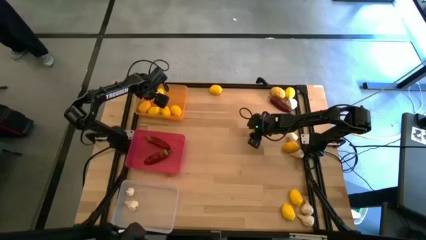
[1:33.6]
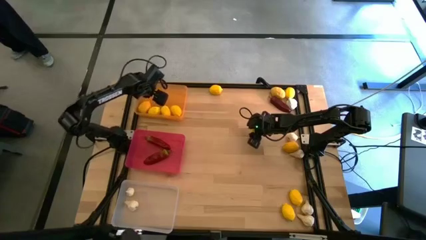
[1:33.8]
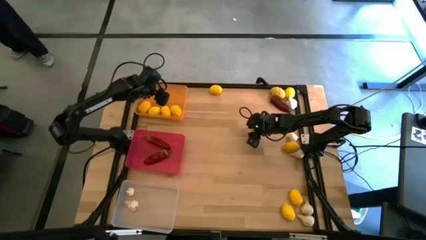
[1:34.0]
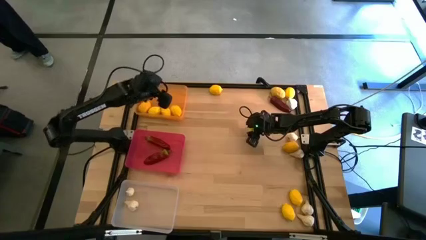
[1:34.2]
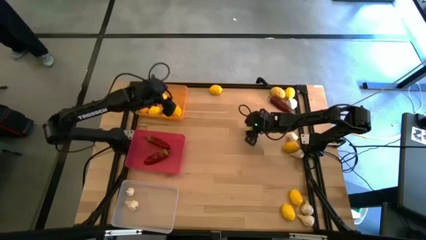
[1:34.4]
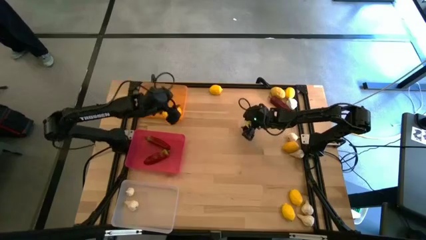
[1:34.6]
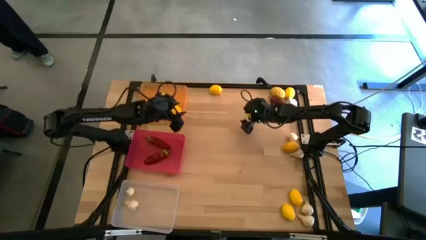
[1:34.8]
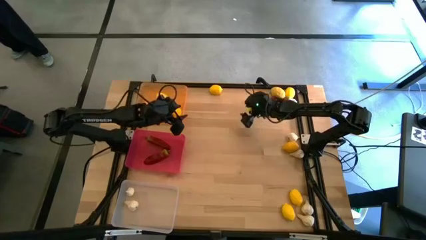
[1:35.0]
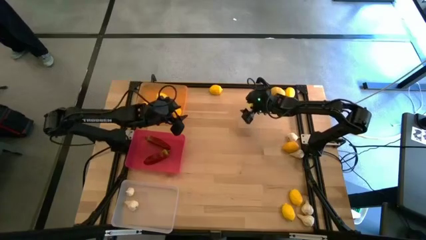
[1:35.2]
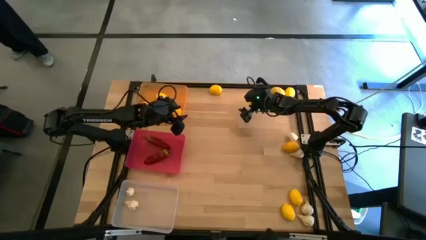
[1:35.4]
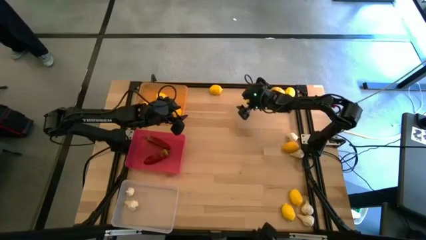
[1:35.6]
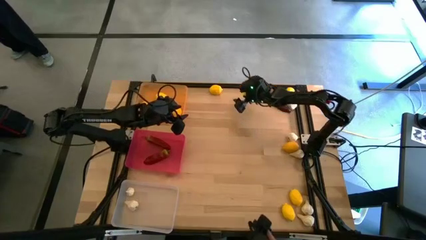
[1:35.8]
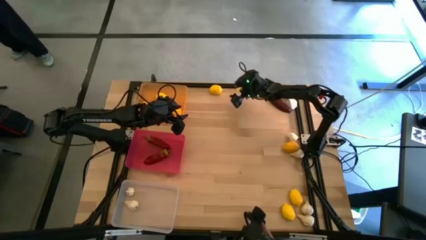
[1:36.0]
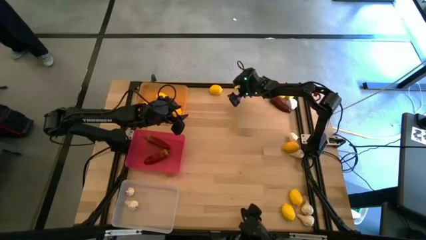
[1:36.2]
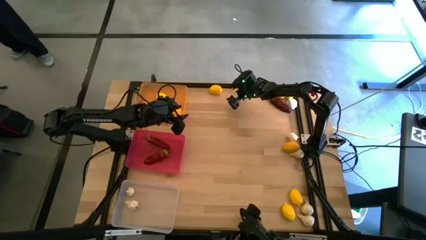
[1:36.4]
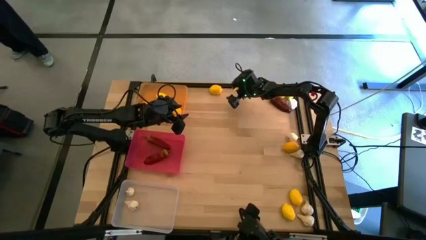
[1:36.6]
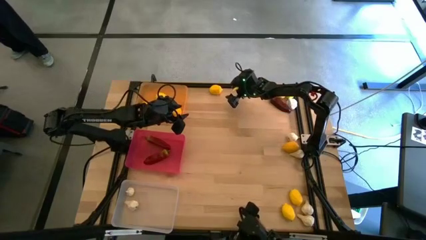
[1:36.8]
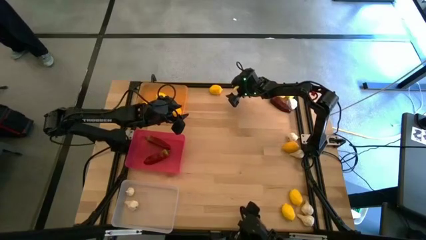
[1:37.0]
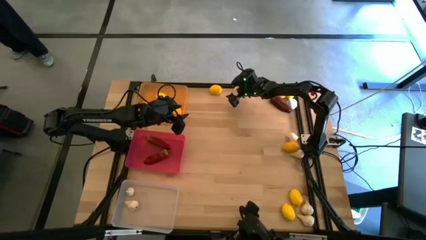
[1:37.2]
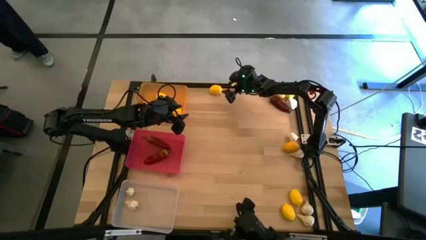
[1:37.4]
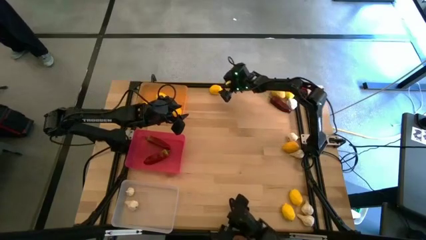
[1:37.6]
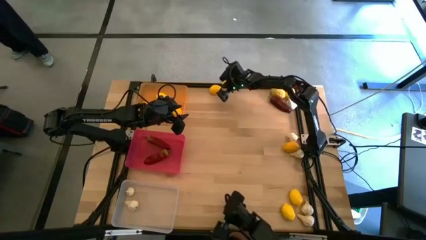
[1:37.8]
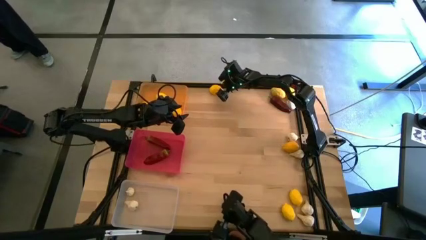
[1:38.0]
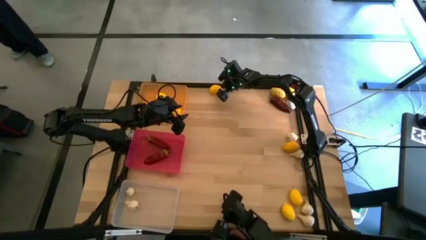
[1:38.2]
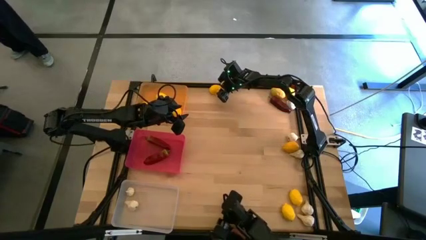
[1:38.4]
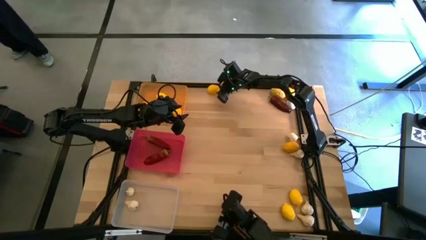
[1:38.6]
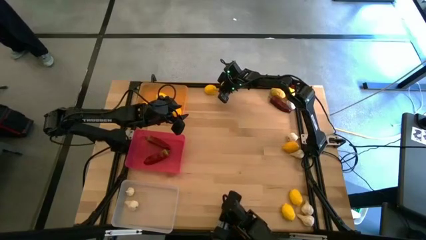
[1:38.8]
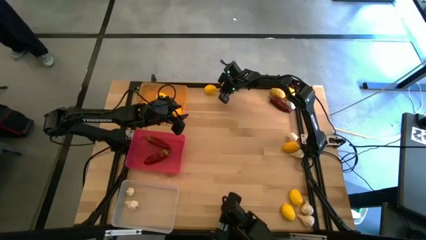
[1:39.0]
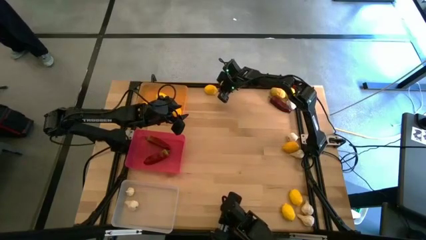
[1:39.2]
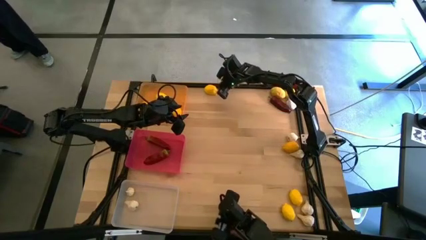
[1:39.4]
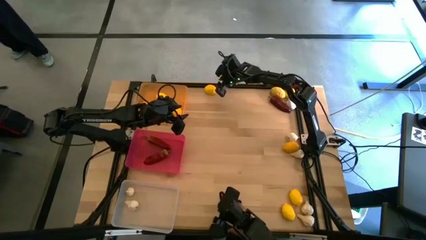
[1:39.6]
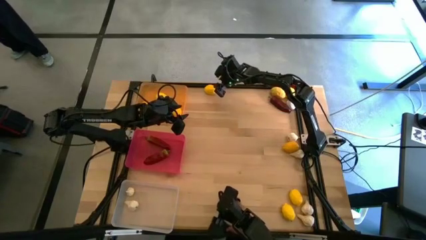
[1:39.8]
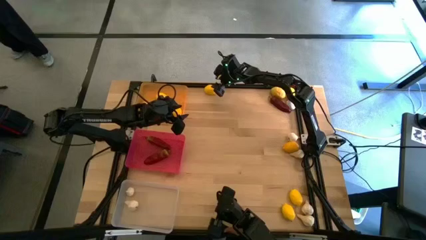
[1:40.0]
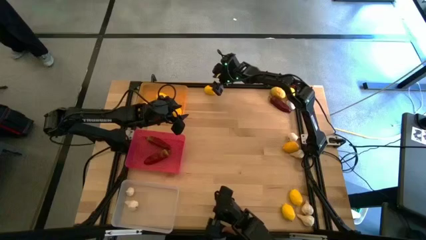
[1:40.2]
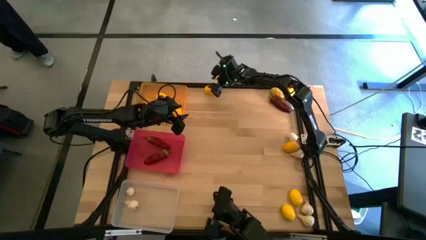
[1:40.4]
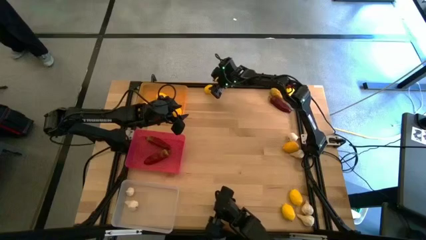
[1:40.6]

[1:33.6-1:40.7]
Task: Sort produce into baskets
Put the lemon into the yellow bin

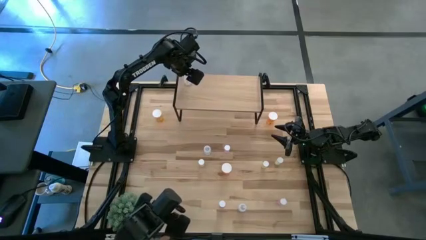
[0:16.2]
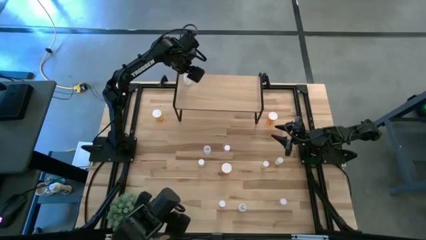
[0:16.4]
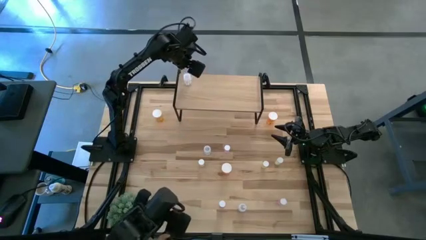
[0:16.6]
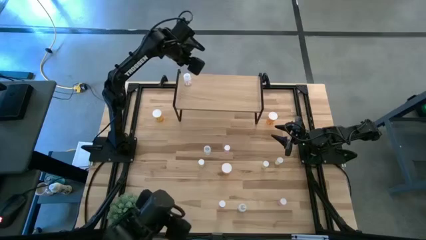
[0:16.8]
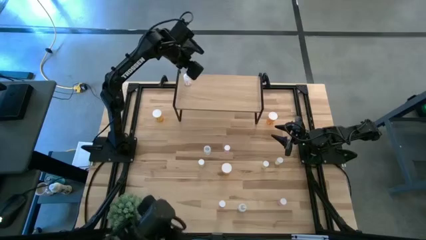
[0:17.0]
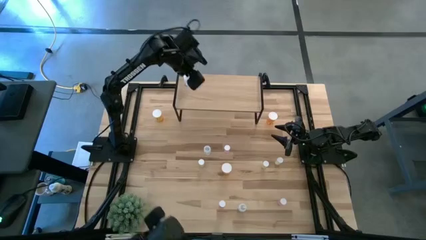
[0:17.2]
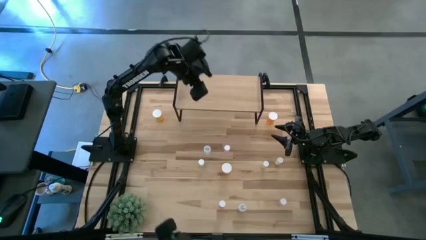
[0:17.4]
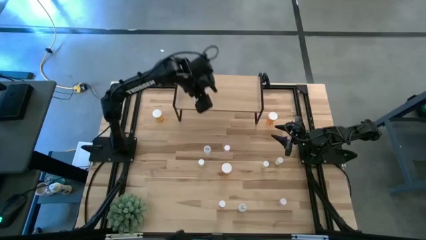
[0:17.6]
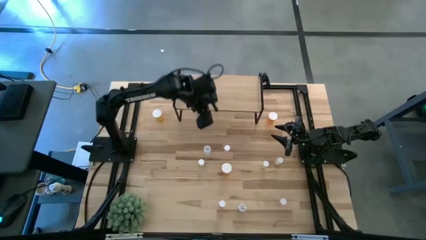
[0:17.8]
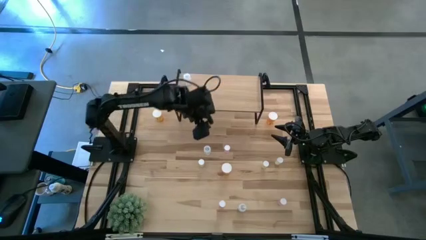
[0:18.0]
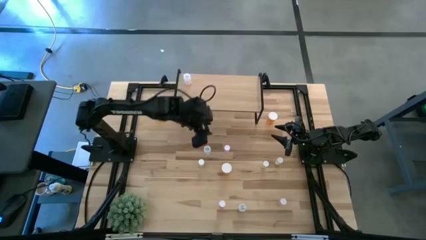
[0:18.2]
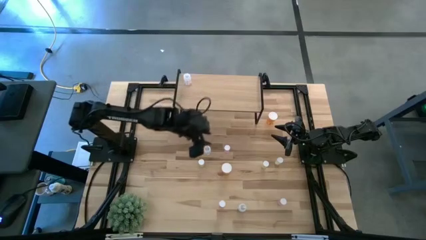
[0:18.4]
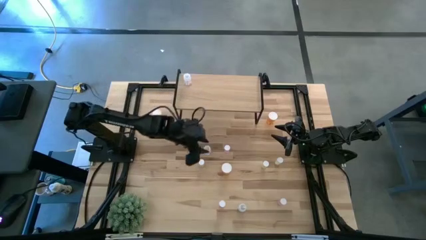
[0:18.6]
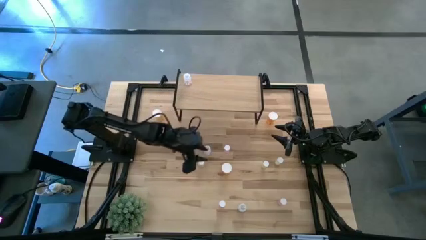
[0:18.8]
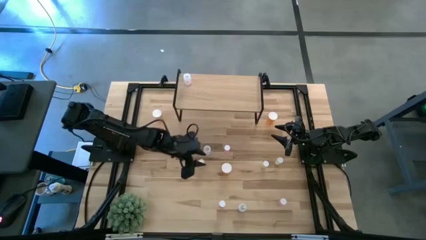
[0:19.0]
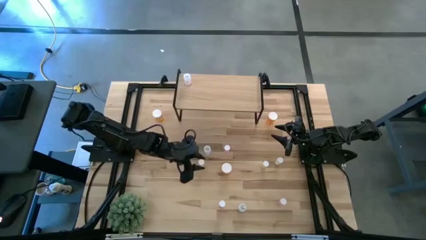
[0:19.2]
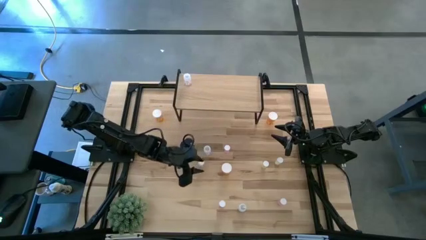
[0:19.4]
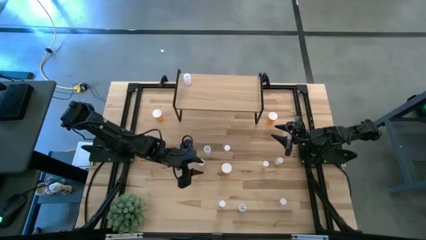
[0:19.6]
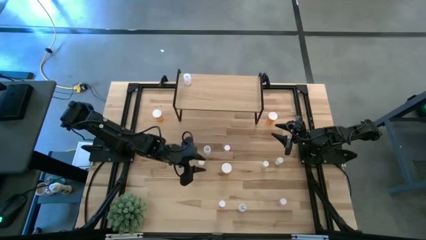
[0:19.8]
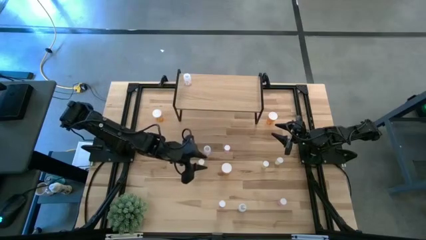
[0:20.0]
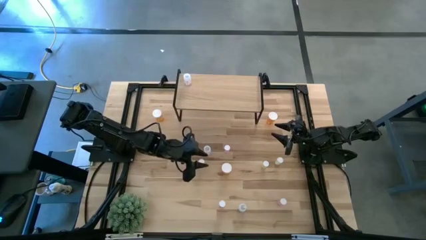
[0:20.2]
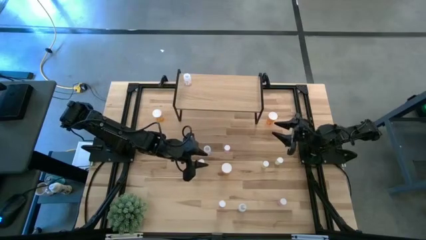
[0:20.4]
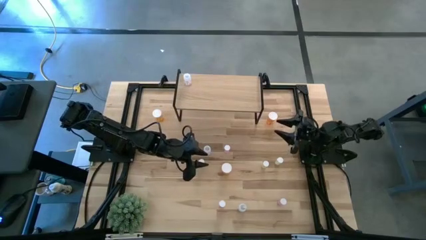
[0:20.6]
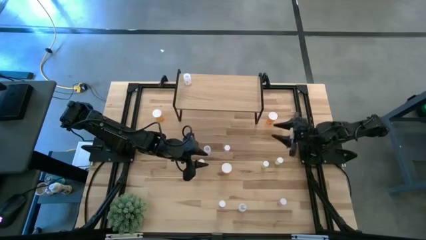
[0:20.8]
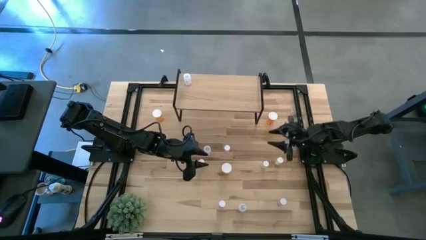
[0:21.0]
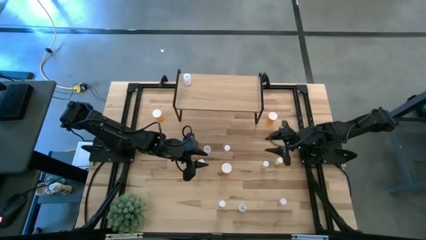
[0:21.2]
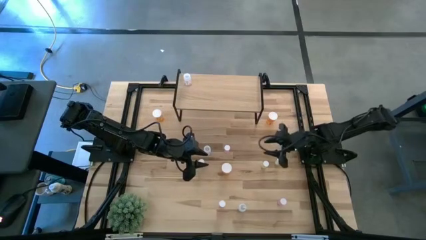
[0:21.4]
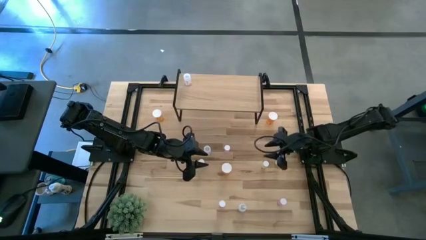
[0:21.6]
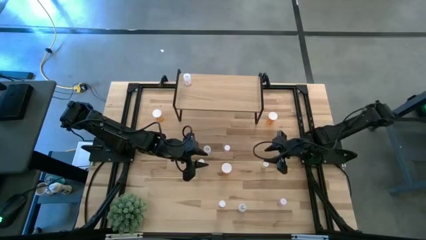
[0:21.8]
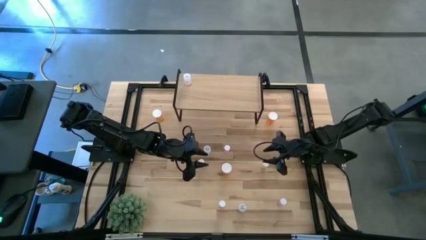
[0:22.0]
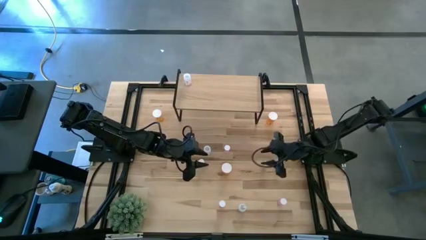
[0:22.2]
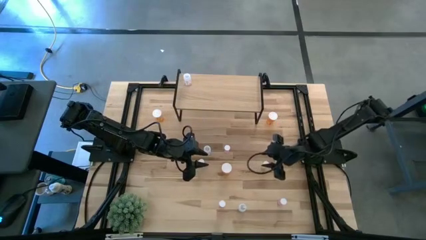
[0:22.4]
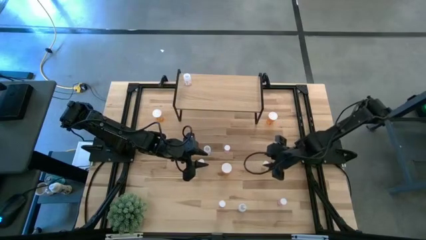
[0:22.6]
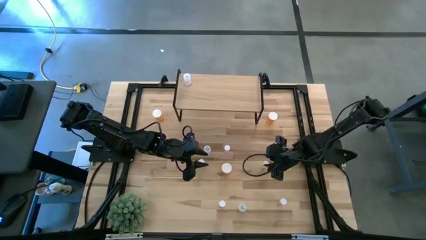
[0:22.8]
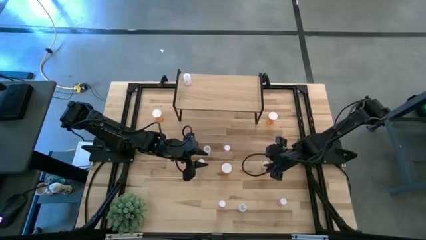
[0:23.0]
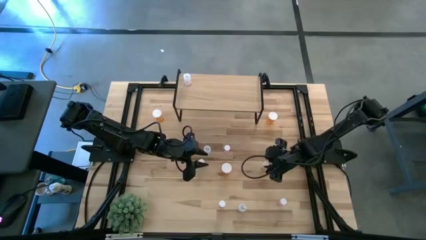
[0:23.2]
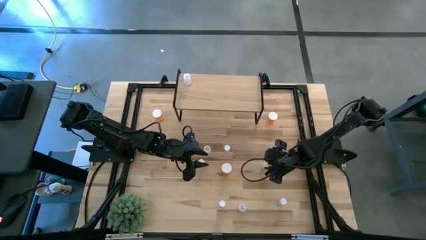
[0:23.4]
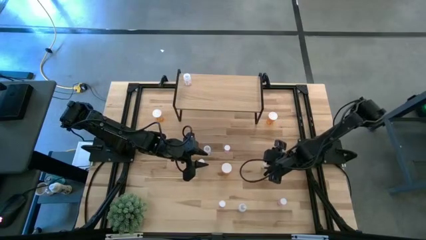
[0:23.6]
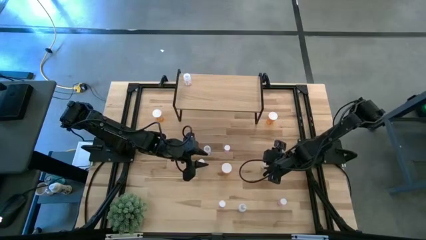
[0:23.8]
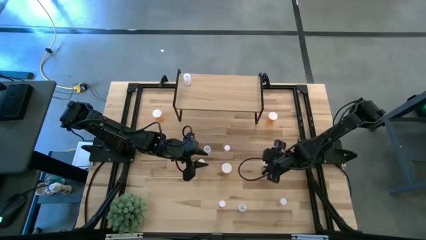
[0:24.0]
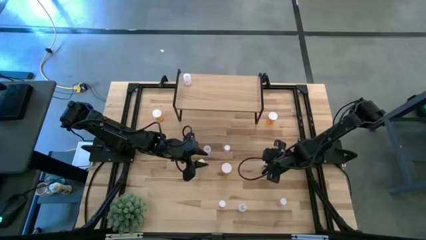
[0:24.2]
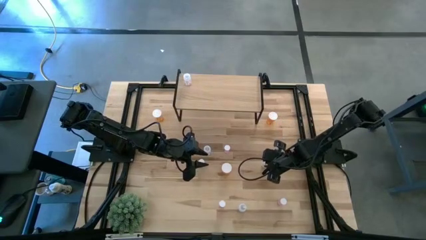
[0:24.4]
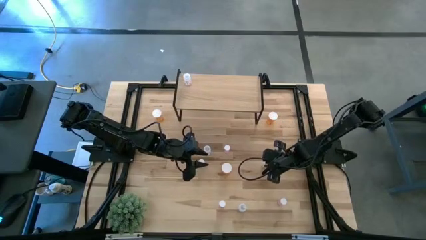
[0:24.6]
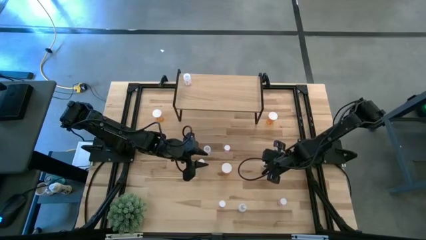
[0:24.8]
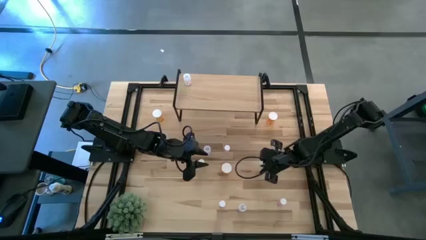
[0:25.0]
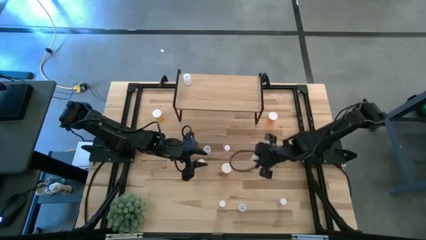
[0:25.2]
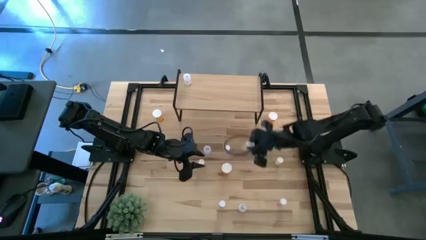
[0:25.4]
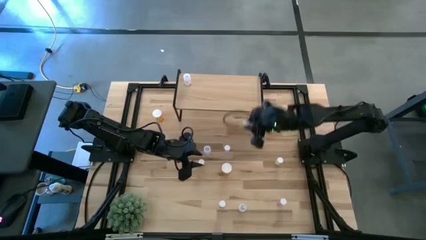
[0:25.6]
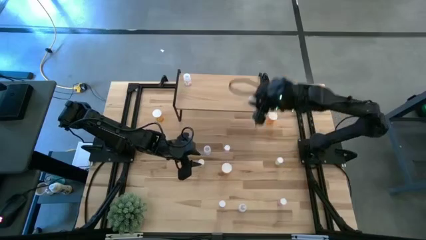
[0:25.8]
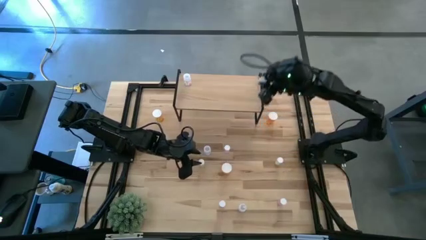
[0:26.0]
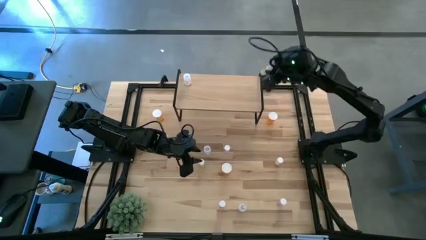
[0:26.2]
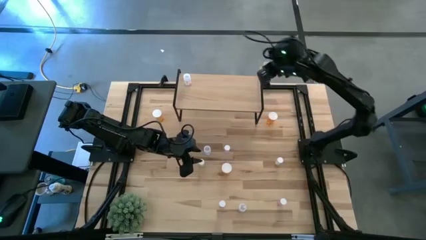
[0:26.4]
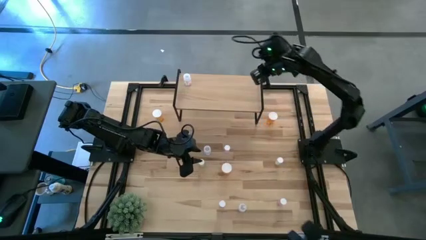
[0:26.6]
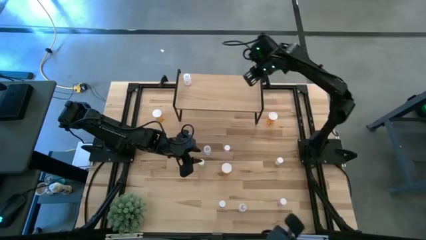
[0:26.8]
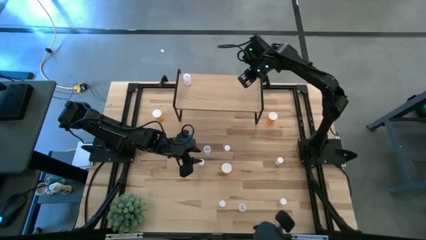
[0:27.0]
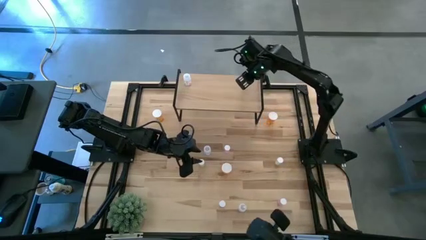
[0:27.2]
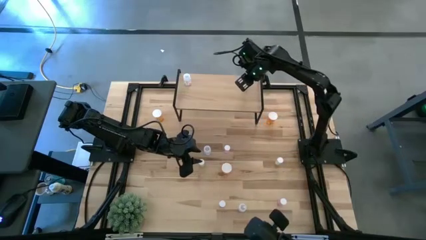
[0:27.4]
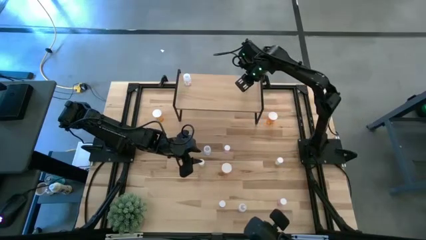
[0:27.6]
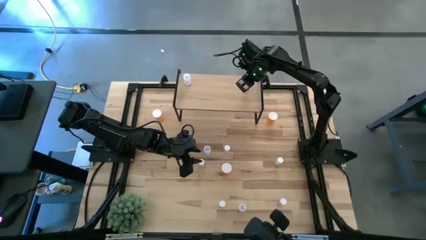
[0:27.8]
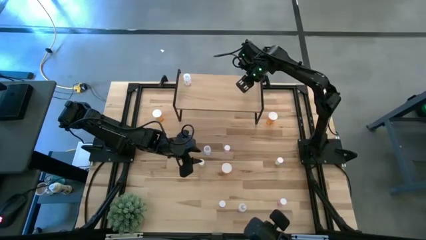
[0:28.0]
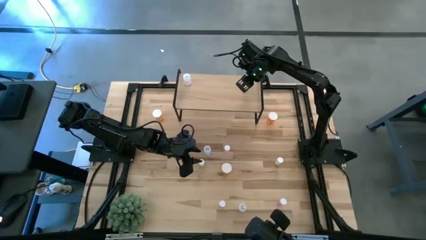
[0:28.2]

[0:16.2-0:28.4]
Task: Pick and place medicine bottles onto shelf by color
Put the middle yellow pill bottle on the shelf
